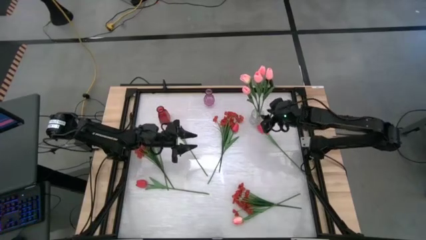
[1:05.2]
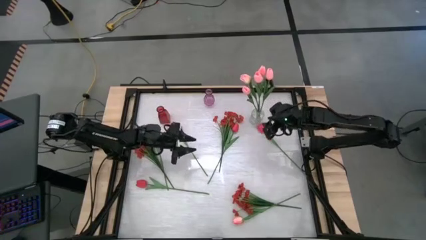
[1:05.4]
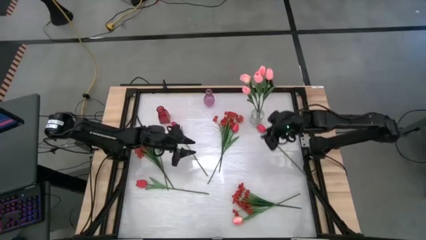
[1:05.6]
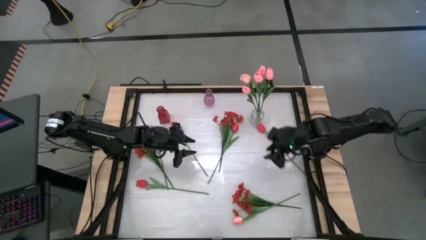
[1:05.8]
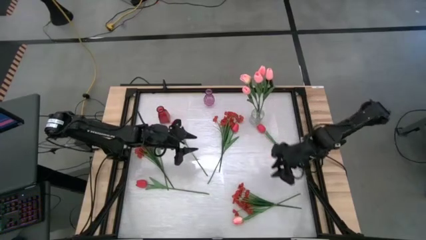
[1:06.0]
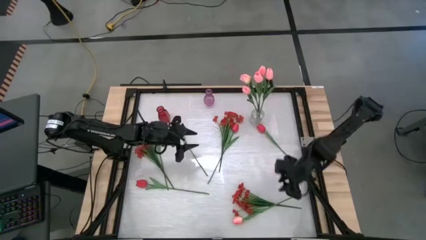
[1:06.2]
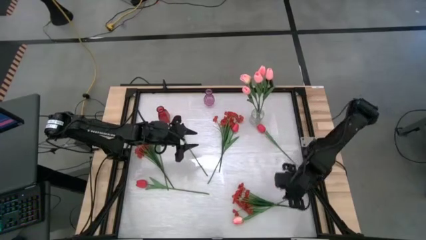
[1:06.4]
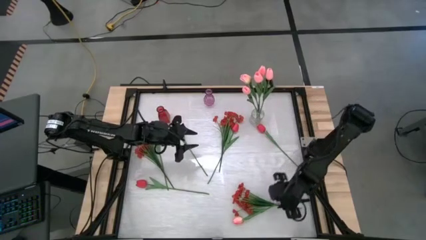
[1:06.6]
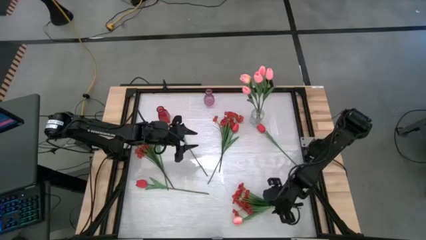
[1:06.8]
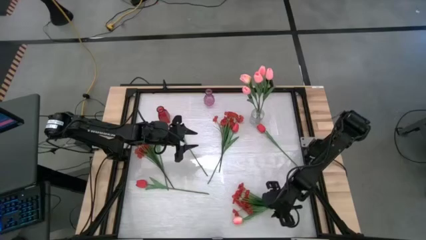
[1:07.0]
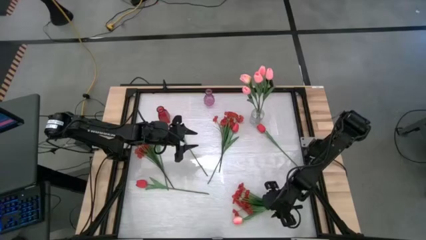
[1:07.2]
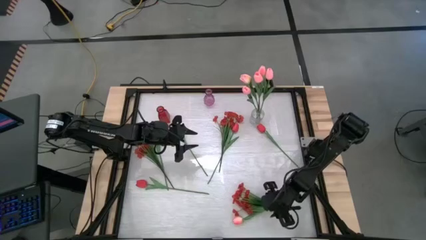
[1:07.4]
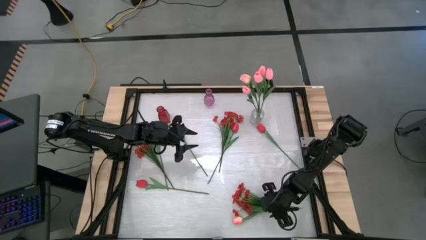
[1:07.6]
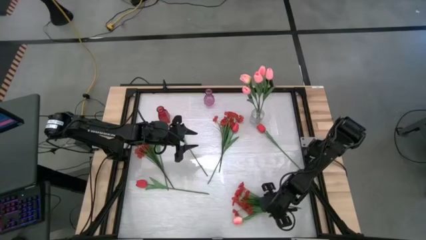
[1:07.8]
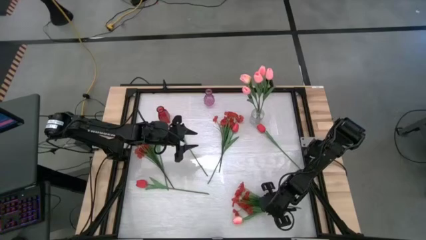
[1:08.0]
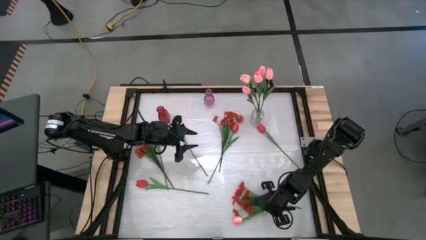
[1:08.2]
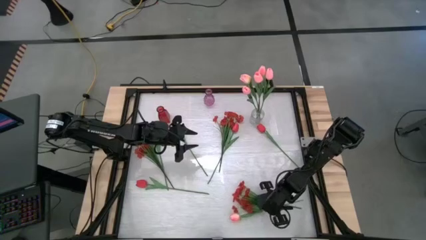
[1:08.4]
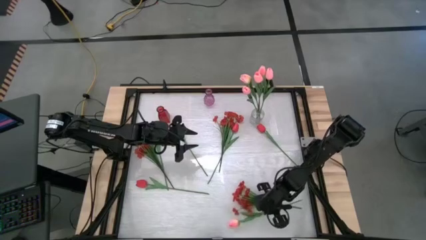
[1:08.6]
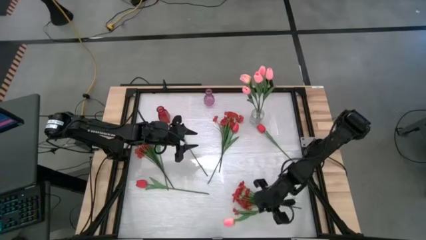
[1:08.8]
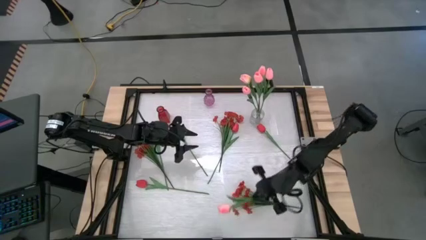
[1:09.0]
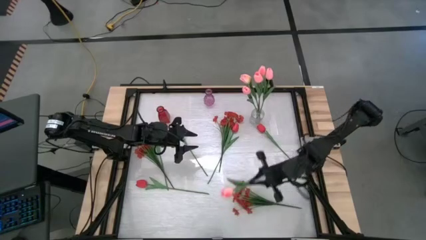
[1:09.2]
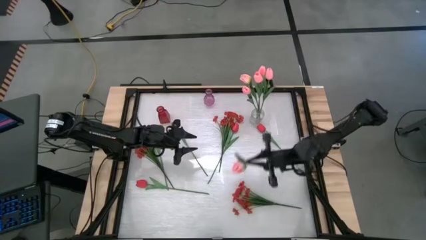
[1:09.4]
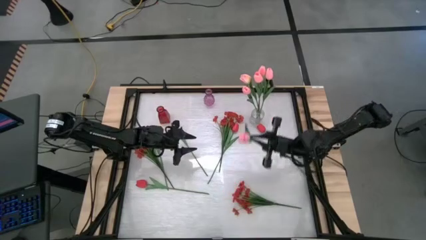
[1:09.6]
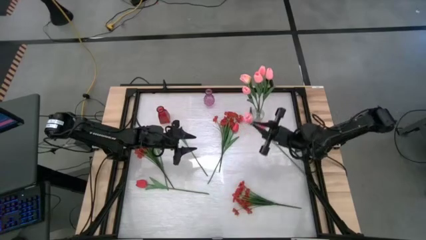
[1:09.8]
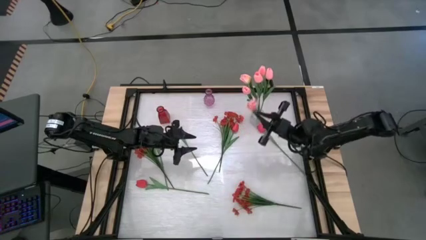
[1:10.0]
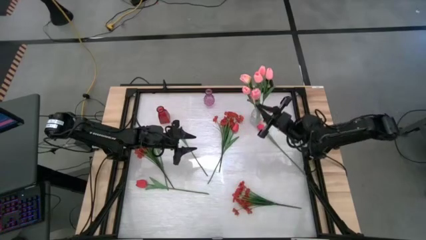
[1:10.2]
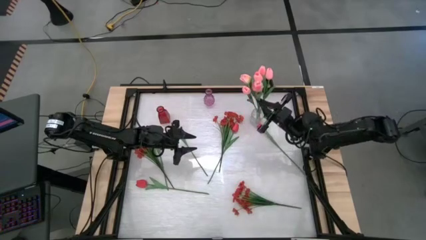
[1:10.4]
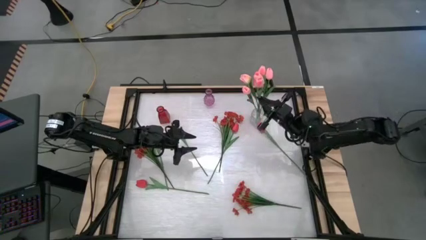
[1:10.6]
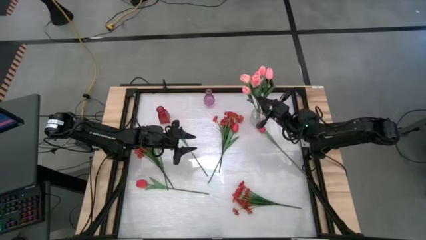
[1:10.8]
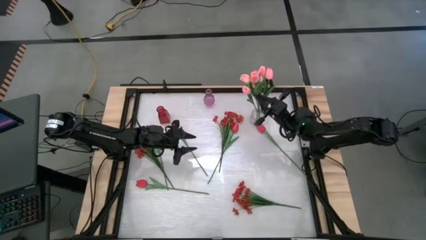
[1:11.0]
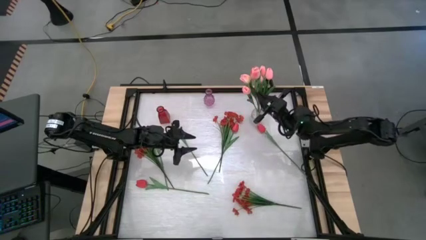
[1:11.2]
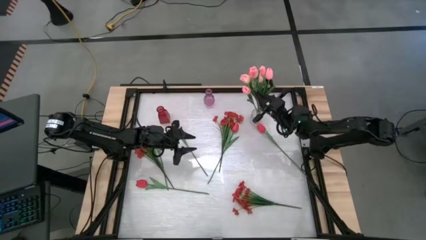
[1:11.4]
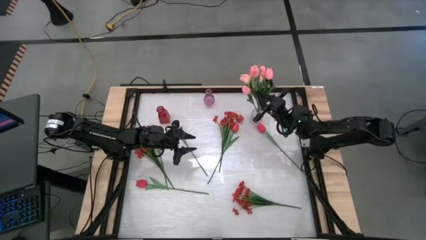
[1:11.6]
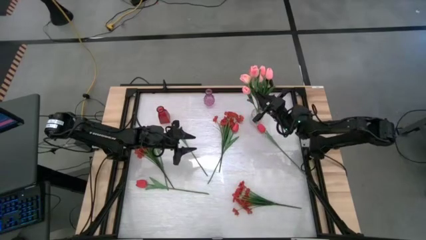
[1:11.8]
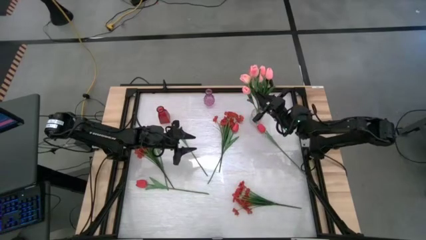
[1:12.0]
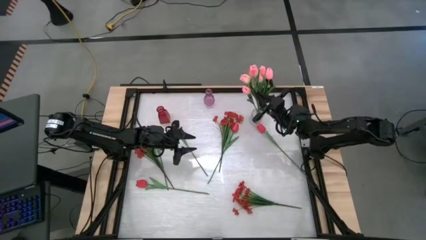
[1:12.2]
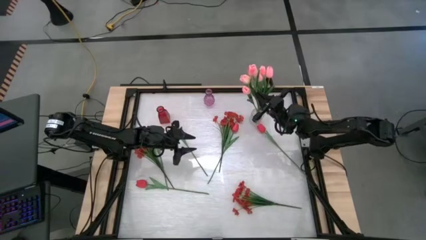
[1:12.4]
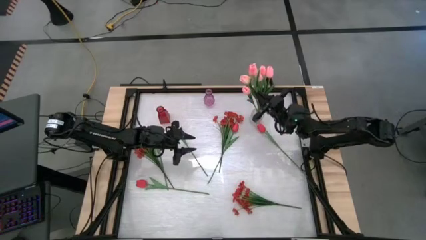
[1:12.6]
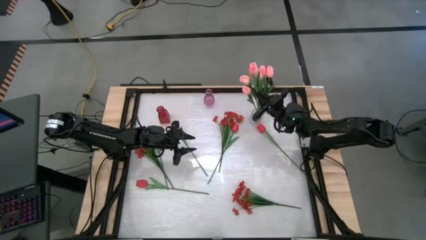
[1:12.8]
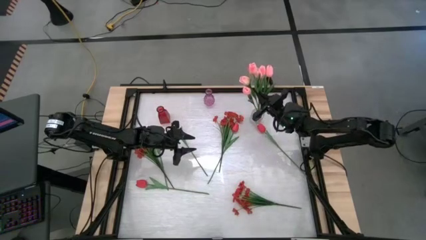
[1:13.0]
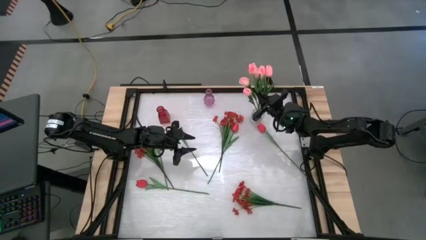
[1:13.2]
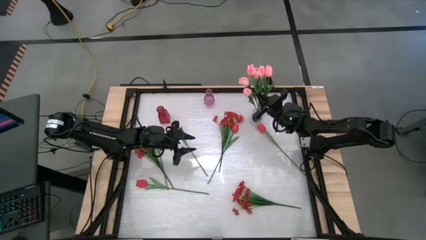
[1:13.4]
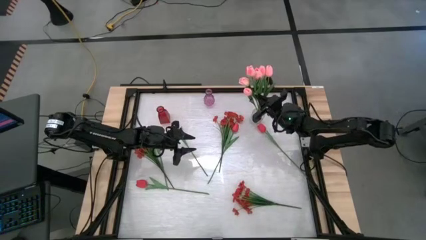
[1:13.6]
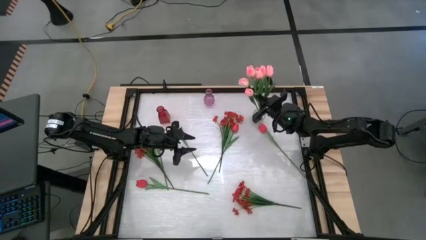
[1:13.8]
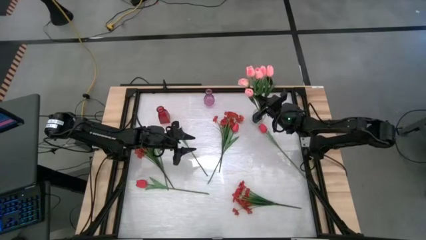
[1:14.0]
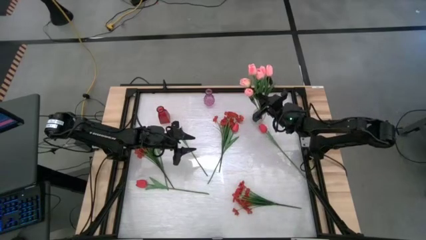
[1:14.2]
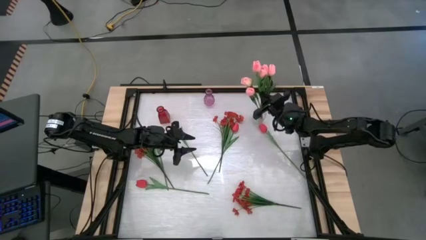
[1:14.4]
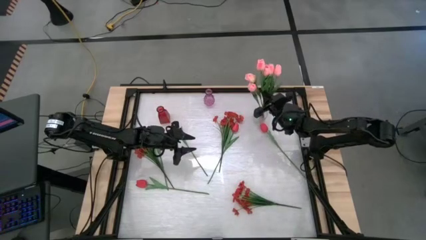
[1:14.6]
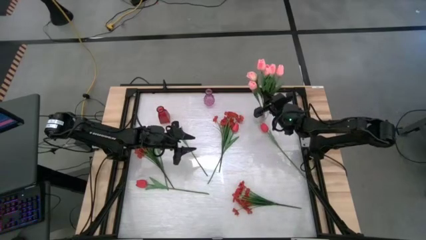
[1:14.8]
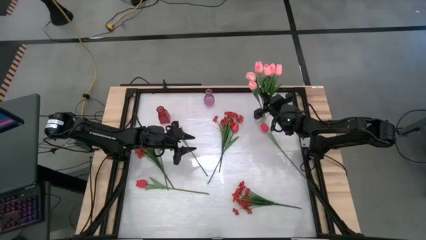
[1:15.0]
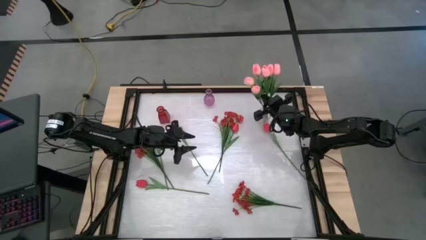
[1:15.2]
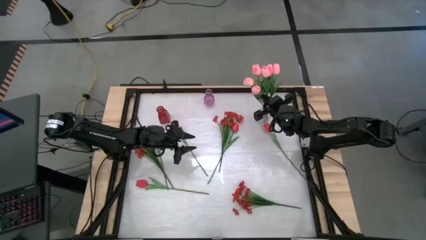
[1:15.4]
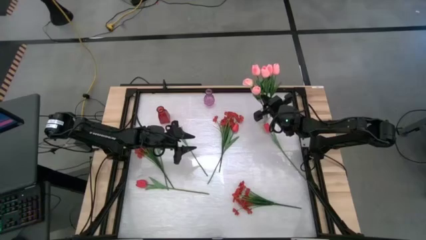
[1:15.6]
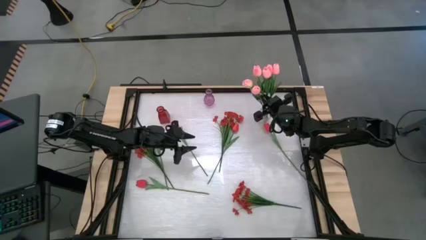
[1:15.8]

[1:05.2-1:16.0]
Task: Sort flowers into vase by color
Put the pink tulip into the transparent vase

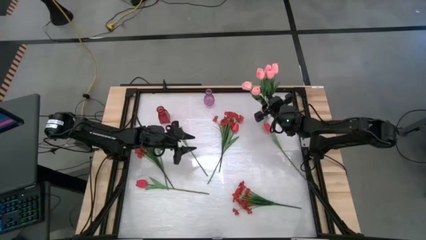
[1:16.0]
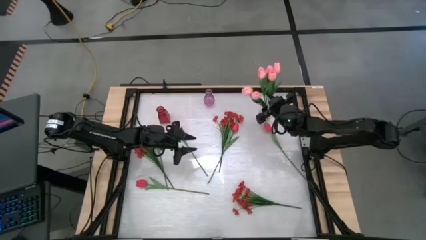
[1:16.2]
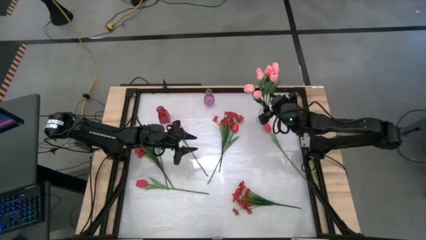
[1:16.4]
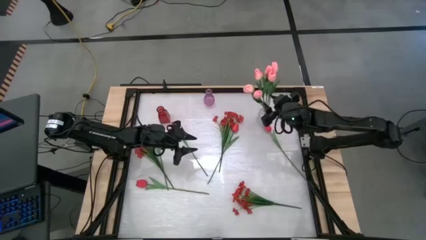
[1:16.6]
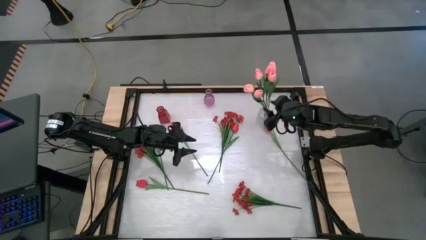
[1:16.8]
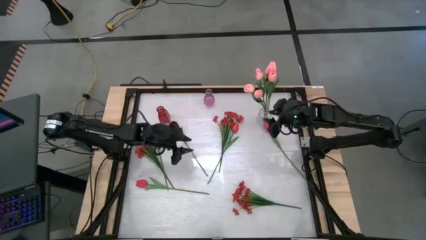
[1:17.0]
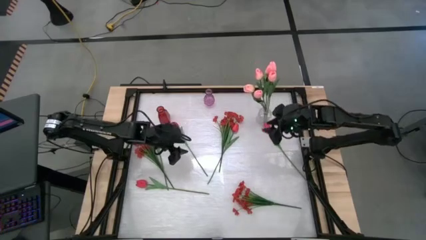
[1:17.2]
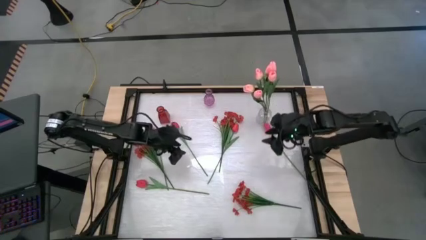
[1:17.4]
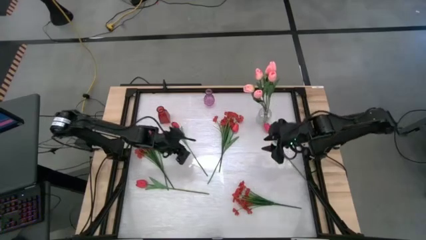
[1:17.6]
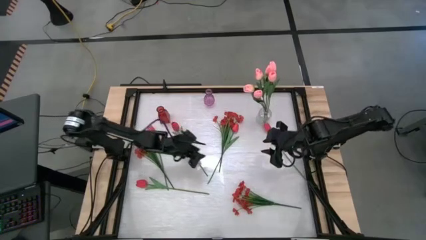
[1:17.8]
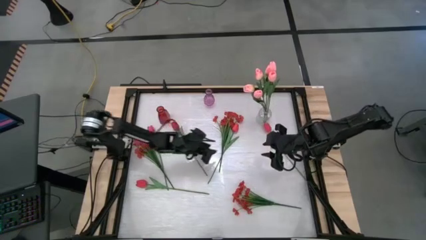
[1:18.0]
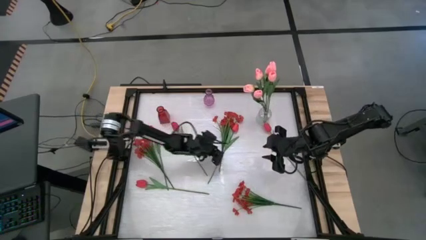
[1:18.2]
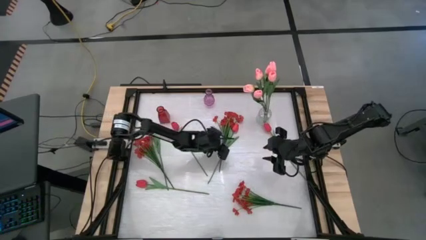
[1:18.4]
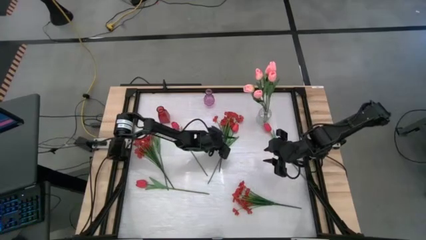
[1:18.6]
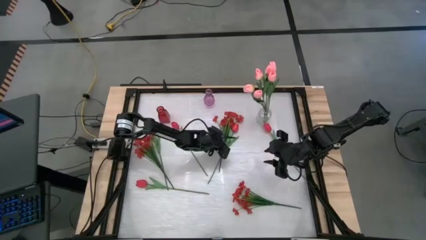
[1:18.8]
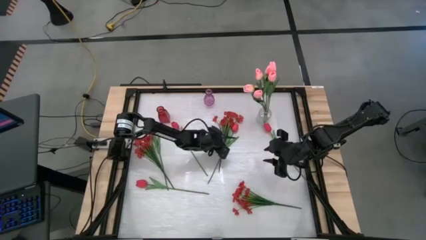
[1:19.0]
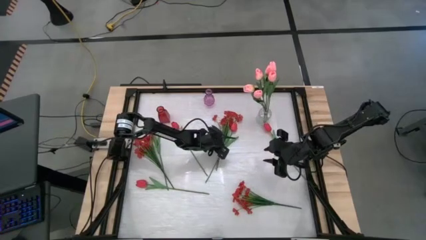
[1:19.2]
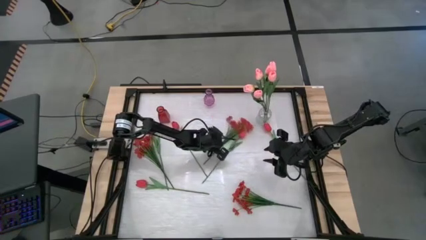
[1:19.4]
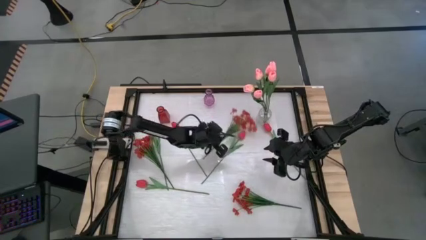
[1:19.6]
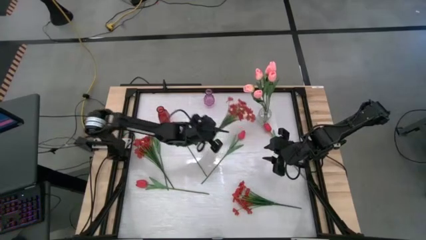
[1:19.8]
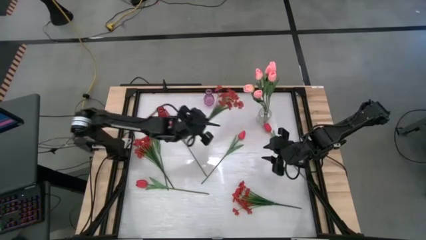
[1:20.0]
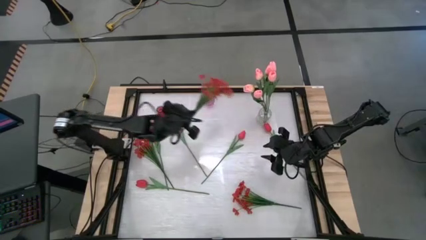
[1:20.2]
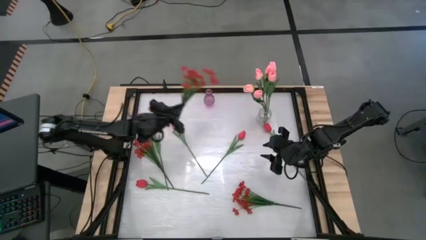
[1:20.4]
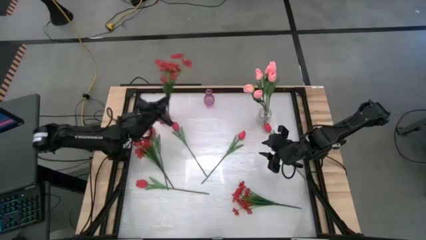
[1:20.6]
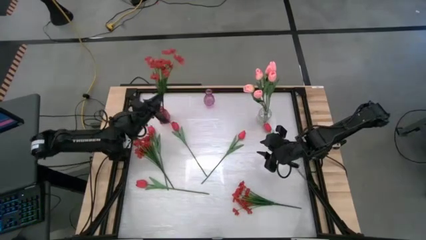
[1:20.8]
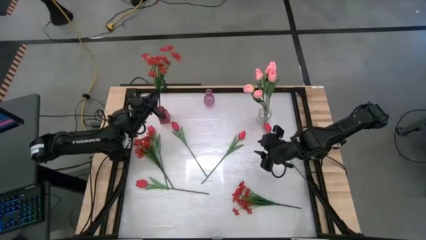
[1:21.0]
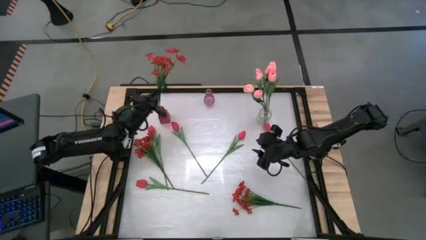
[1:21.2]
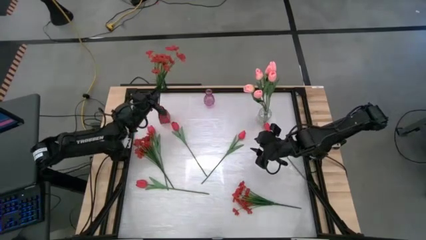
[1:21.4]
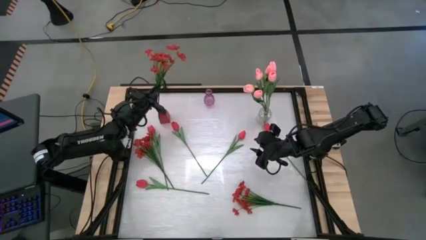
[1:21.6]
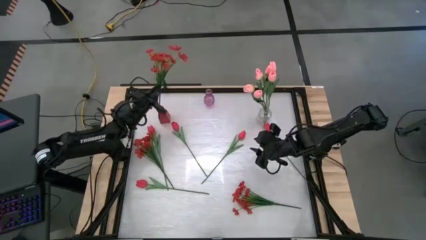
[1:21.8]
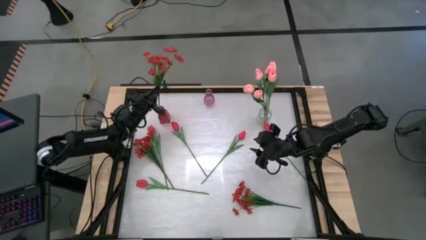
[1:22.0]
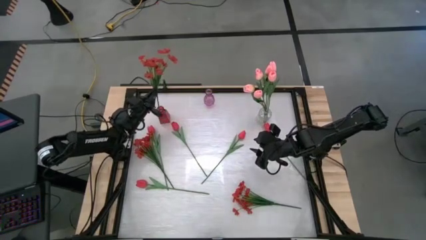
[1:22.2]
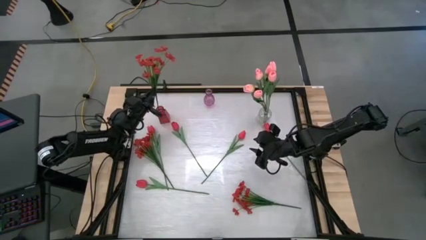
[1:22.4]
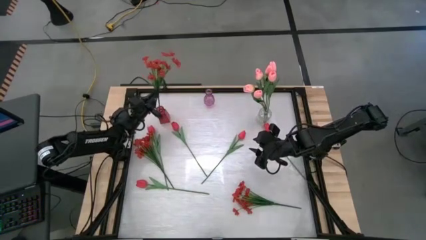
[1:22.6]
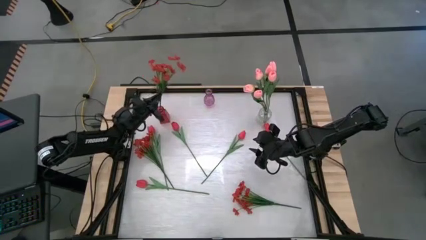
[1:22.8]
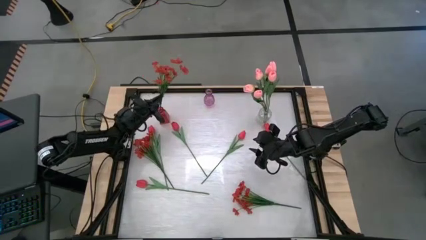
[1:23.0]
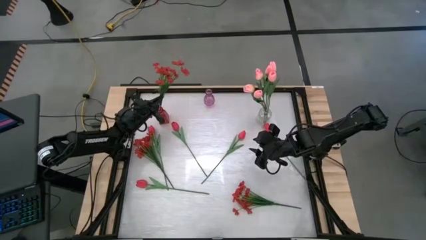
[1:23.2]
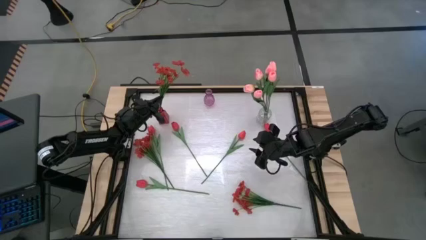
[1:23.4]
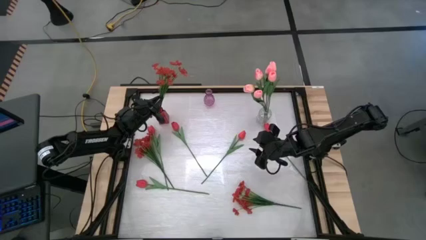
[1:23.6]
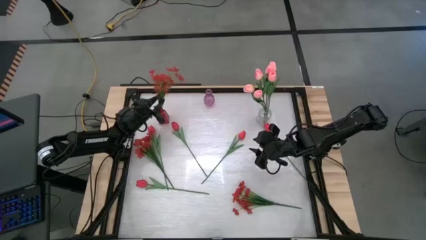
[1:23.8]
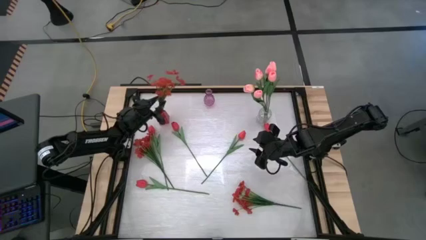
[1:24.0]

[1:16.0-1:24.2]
Put the top middle red flowers into the red vase
